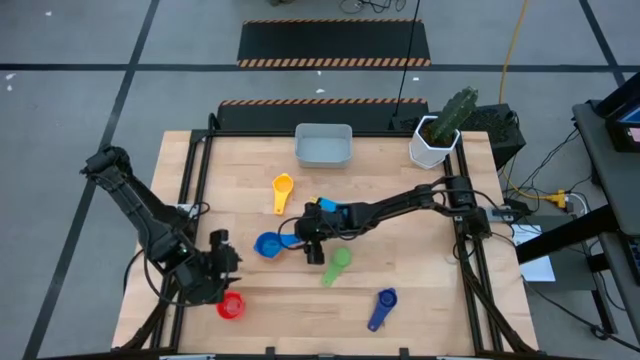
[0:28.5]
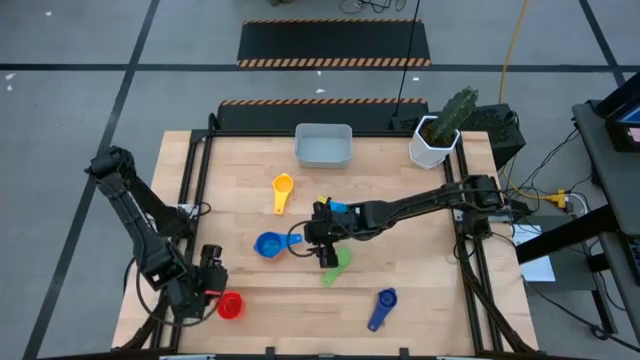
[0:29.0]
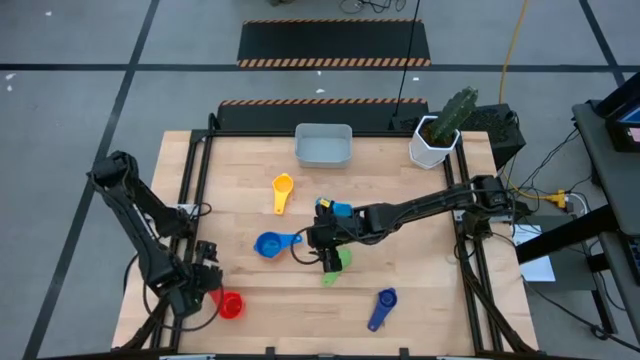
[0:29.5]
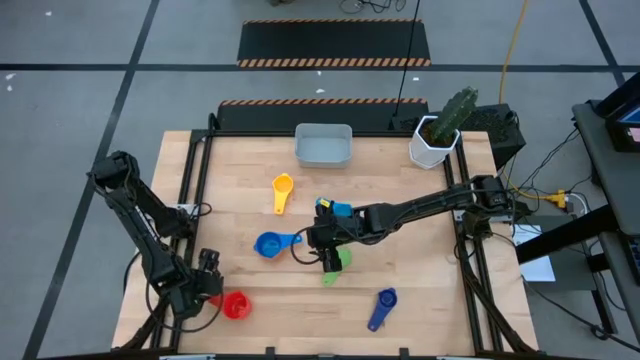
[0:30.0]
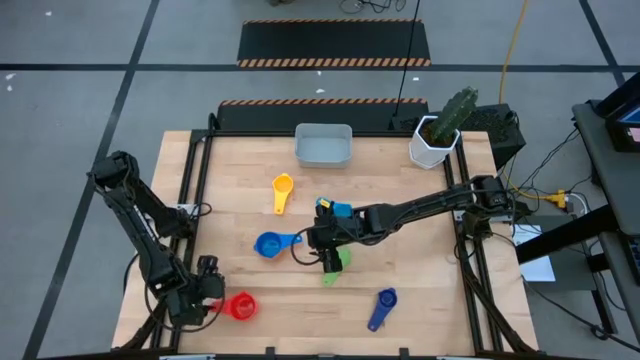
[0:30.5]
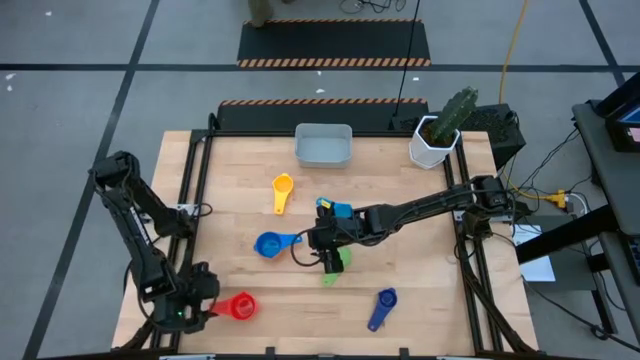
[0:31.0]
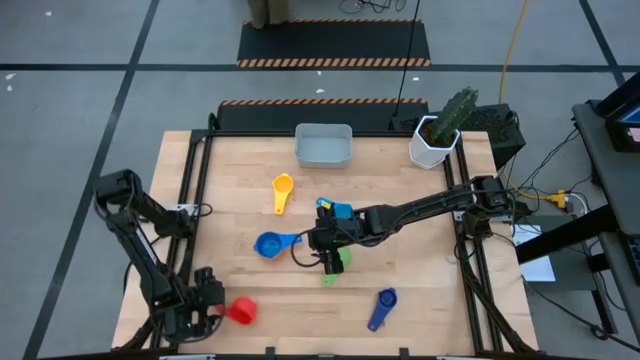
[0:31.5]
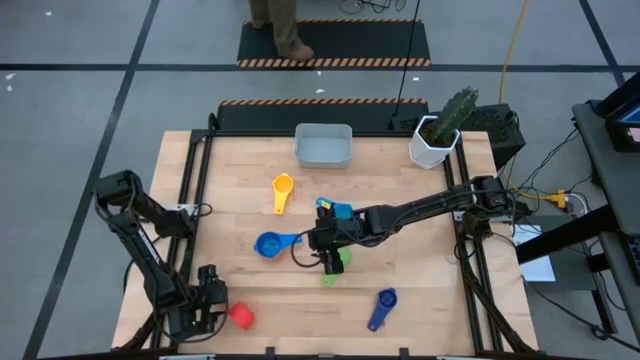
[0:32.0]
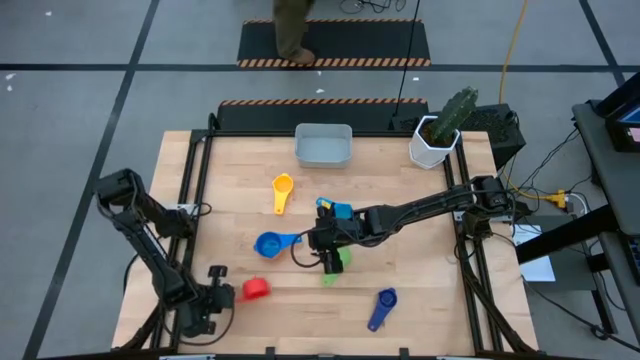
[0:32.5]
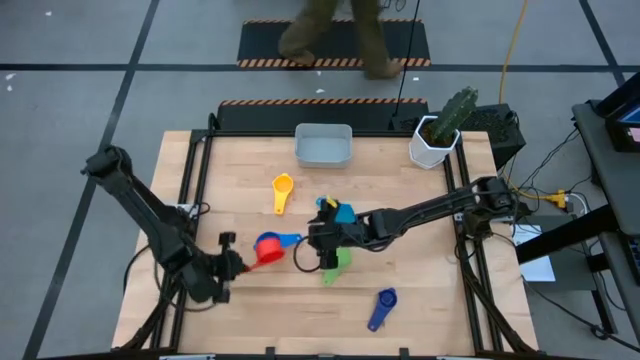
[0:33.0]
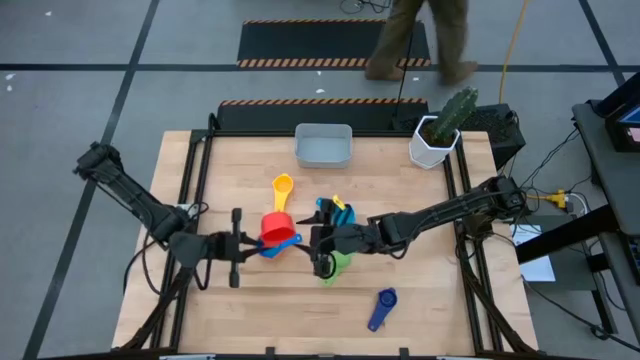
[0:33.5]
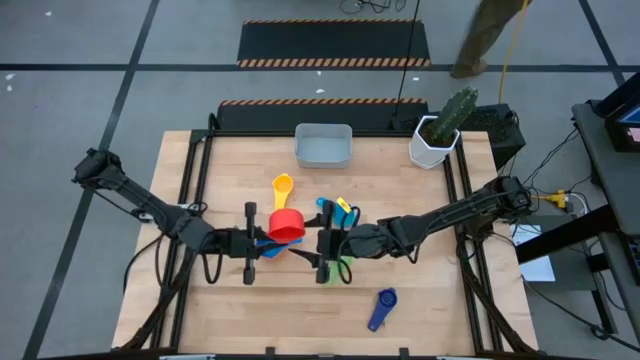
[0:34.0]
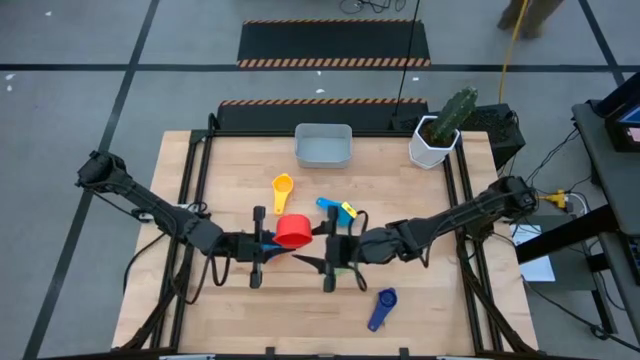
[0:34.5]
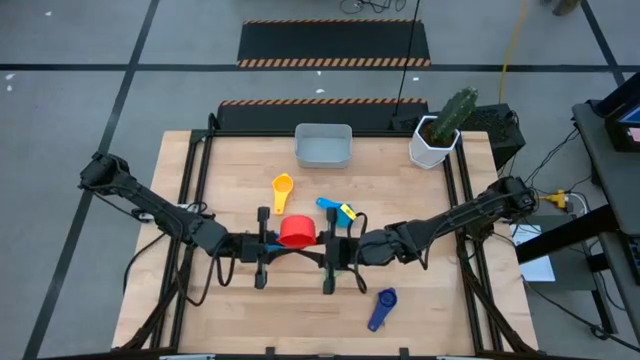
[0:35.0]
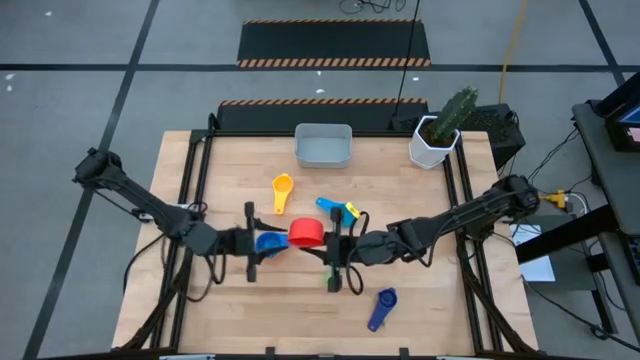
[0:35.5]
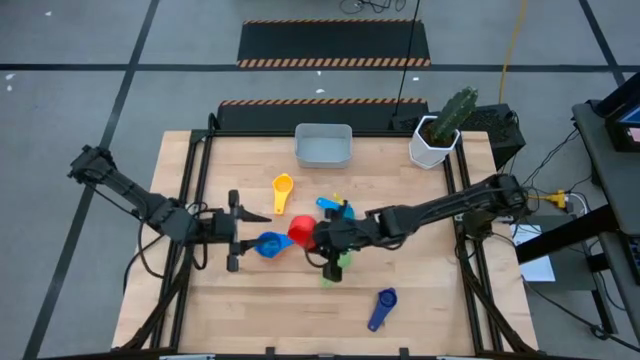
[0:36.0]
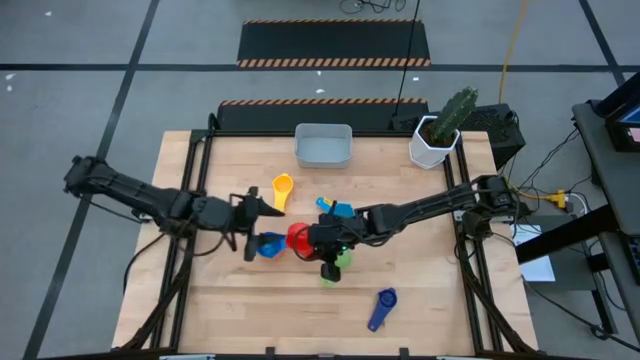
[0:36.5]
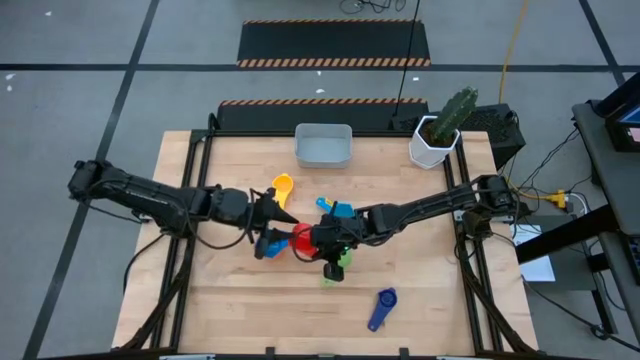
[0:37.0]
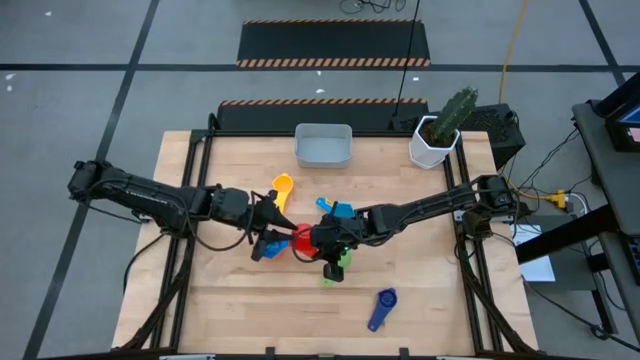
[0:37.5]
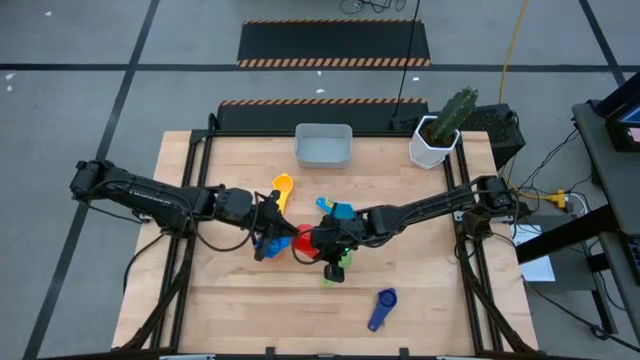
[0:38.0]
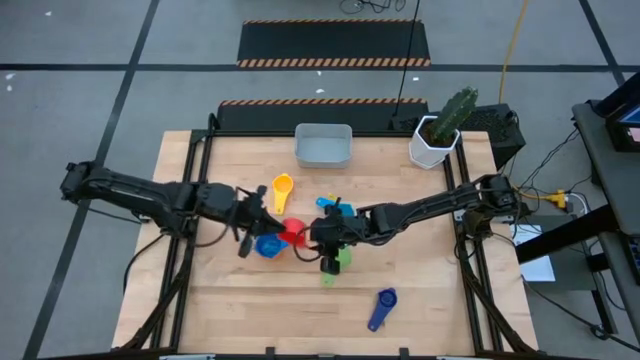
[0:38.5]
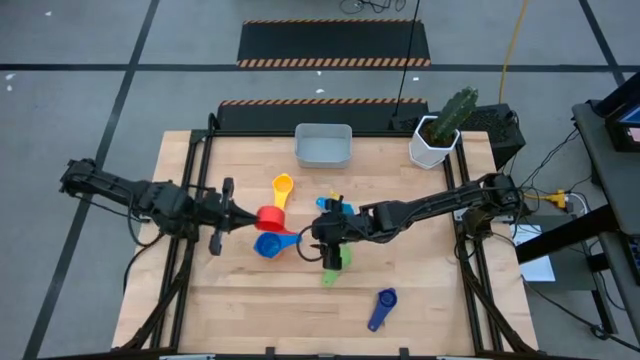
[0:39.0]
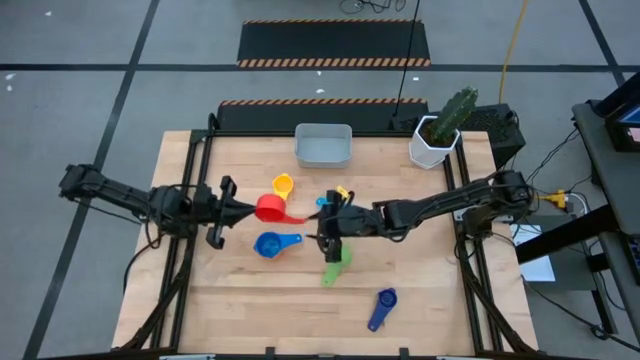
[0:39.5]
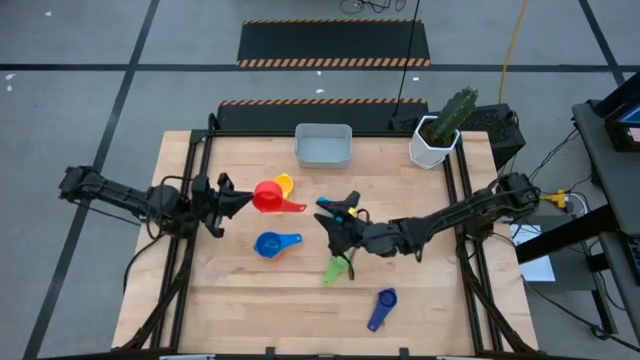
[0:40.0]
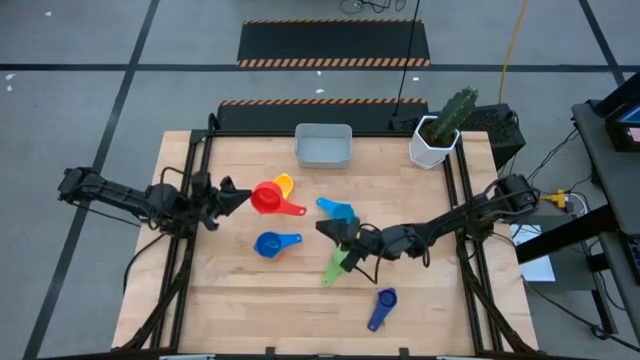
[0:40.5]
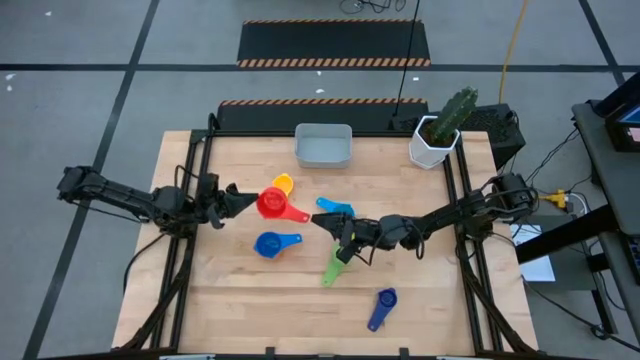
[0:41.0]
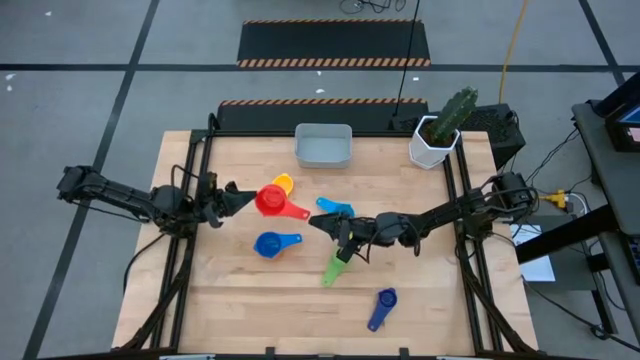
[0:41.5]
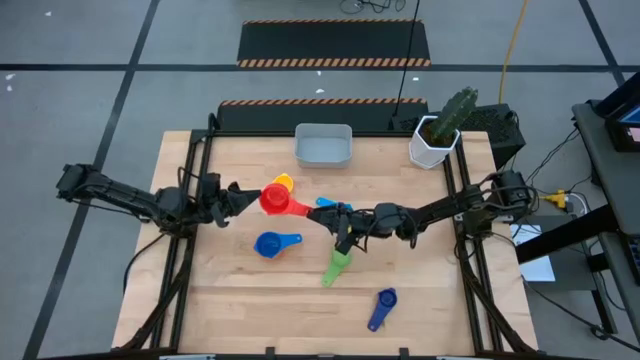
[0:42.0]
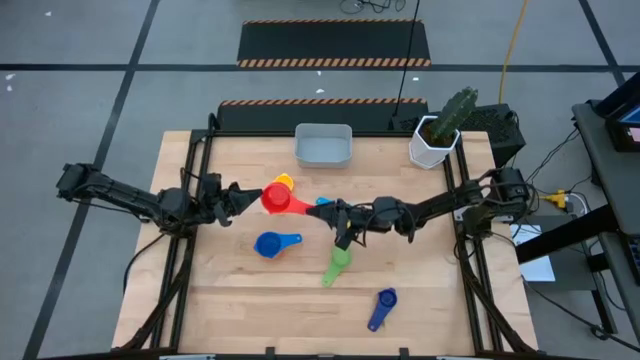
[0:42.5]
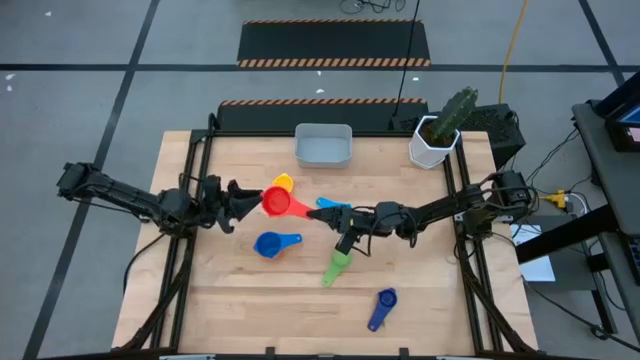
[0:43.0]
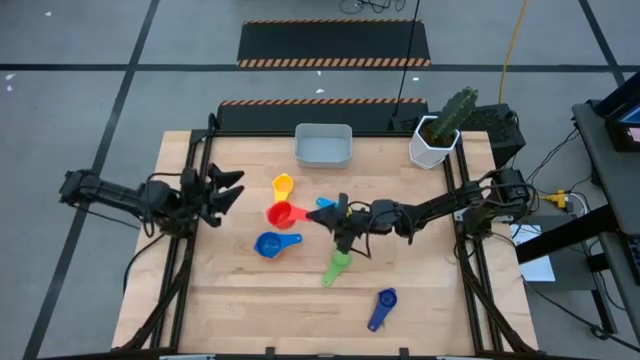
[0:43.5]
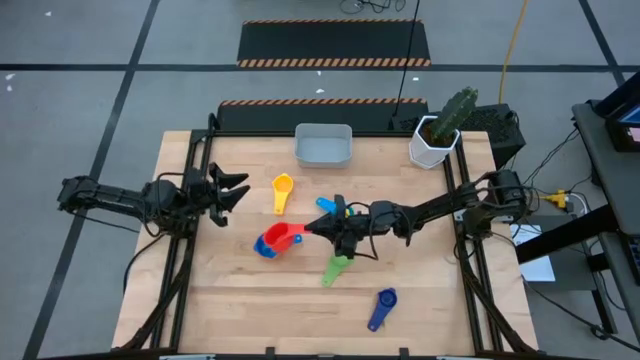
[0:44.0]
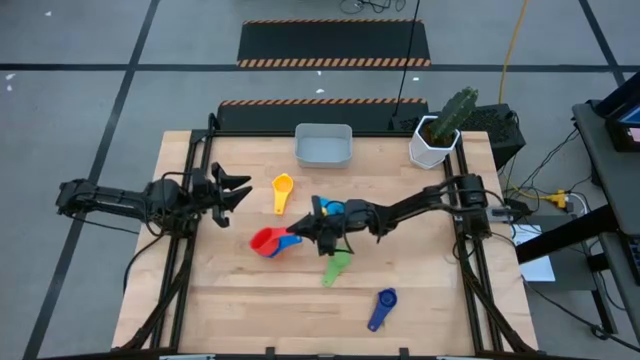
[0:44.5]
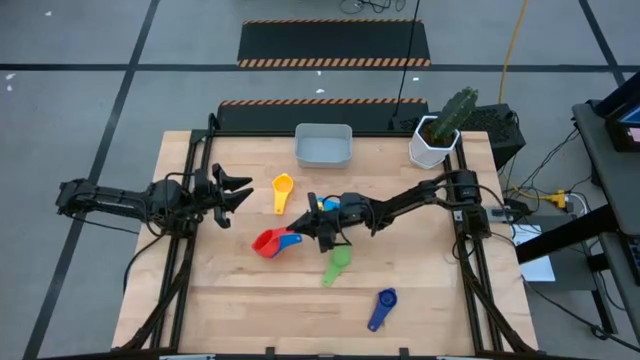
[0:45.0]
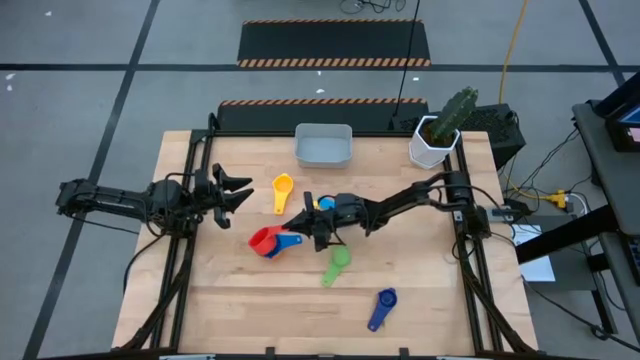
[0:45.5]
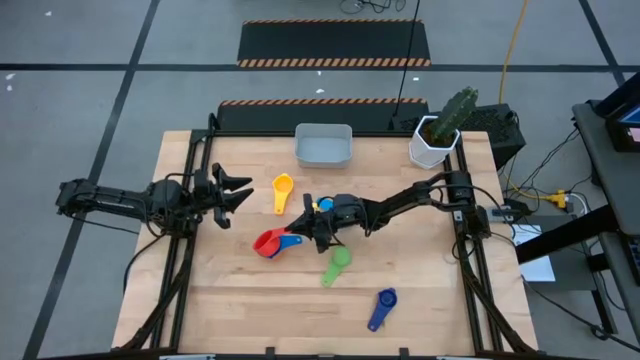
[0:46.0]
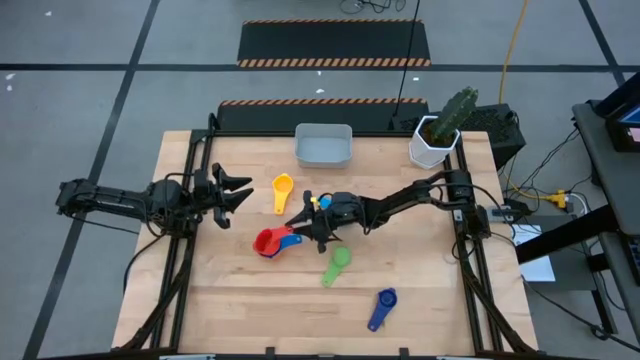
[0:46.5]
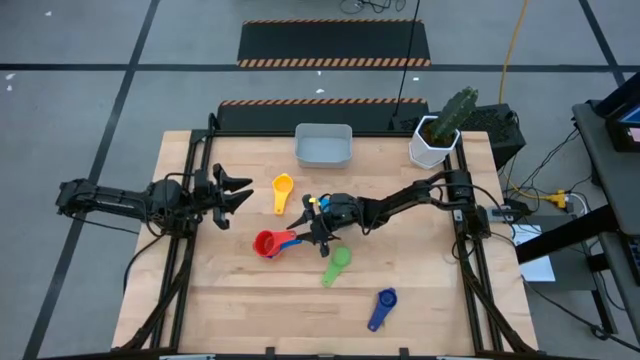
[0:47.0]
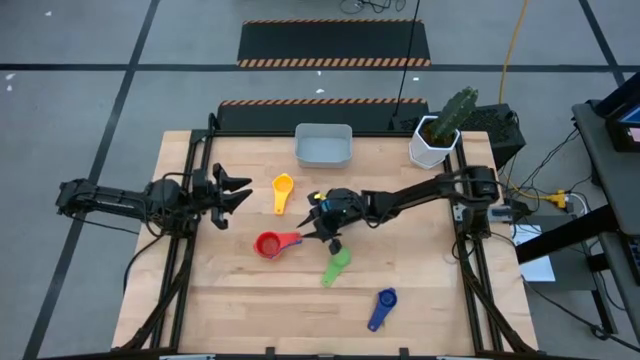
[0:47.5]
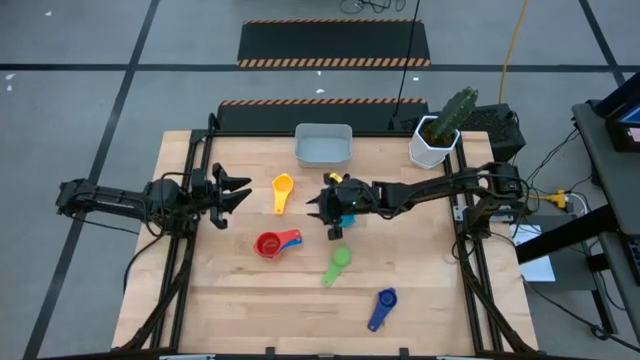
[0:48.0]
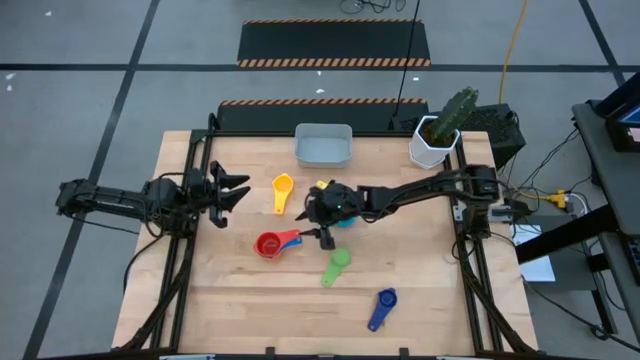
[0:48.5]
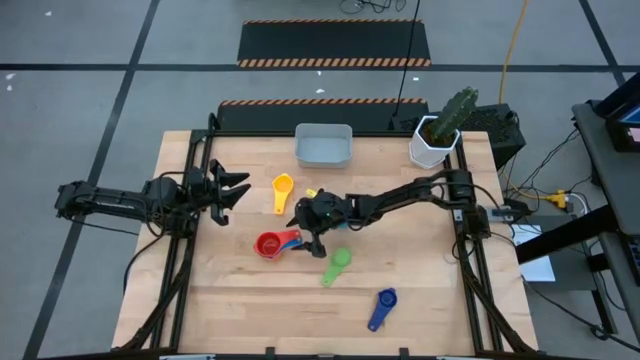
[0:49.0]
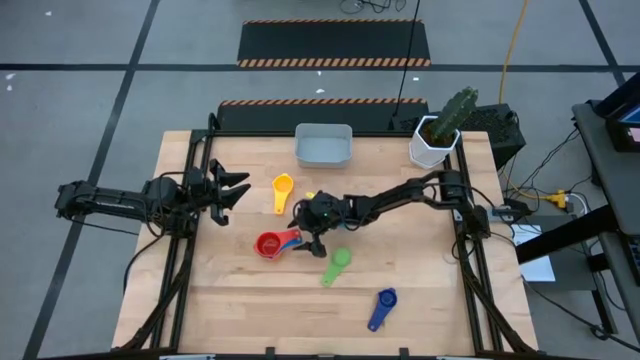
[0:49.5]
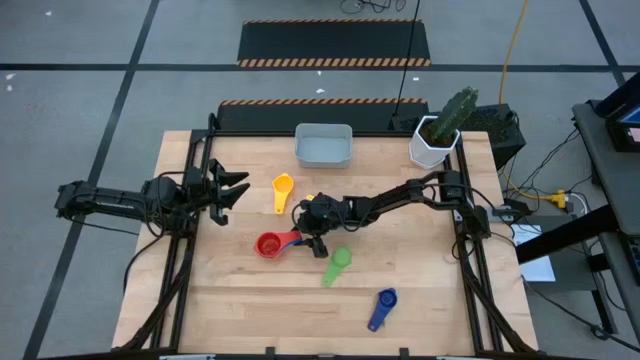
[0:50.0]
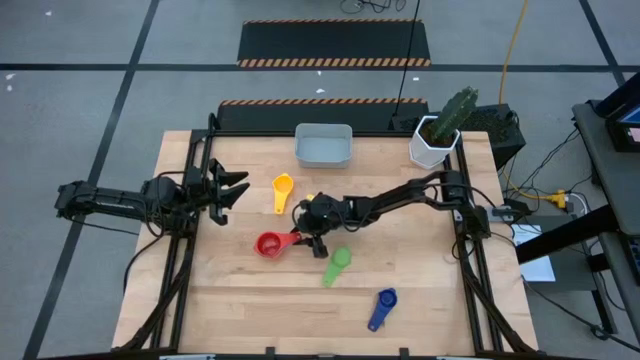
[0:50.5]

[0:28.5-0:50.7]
Task: Nest measuring cups in basket
Stack the red measuring cup into the blue measuring cup
